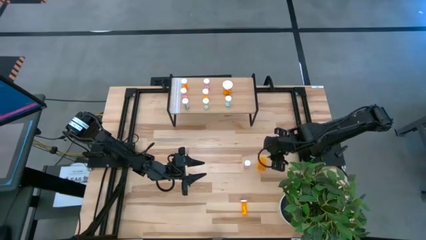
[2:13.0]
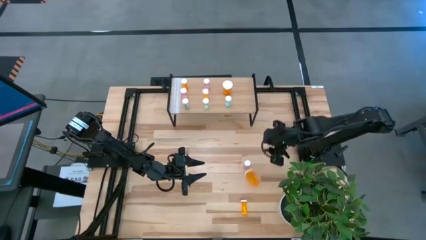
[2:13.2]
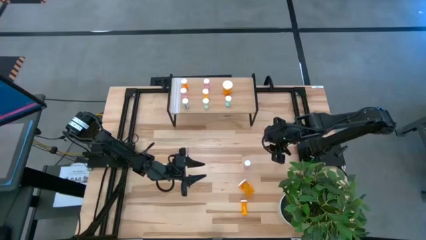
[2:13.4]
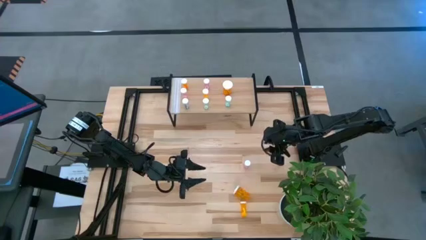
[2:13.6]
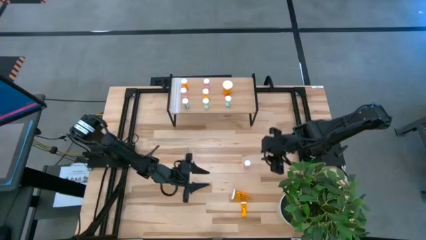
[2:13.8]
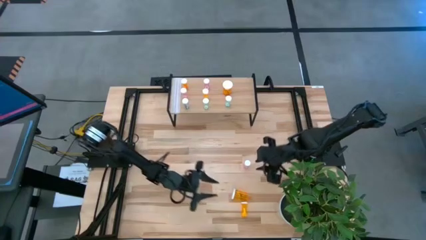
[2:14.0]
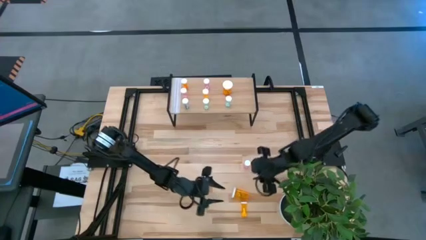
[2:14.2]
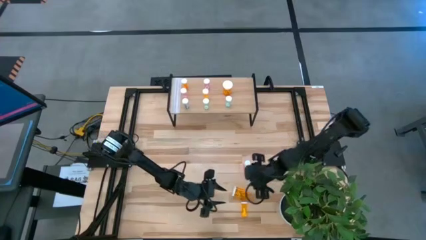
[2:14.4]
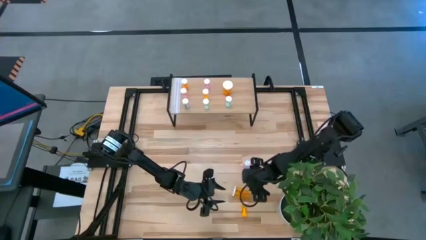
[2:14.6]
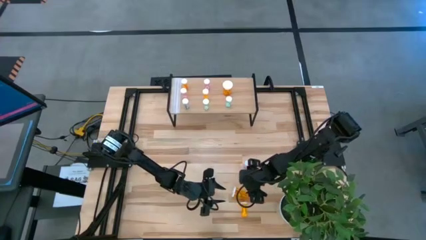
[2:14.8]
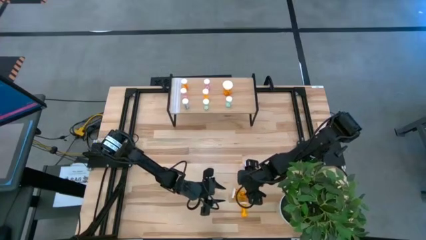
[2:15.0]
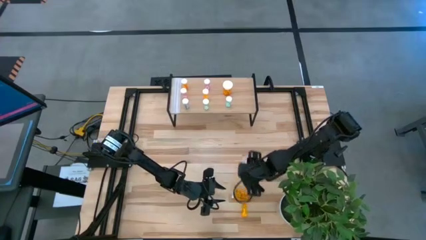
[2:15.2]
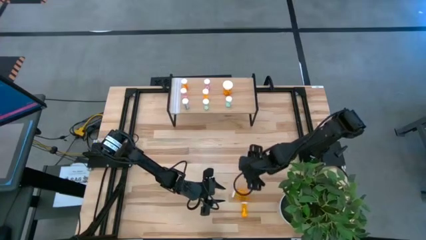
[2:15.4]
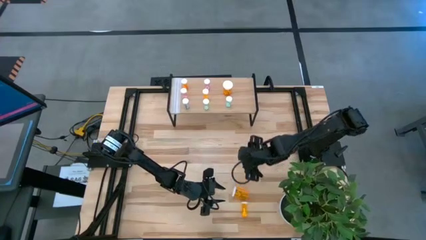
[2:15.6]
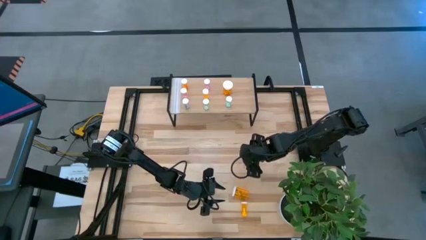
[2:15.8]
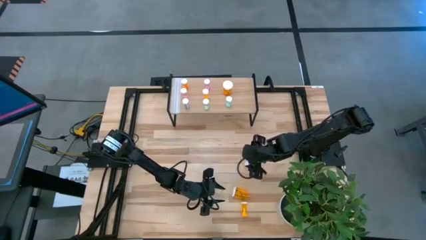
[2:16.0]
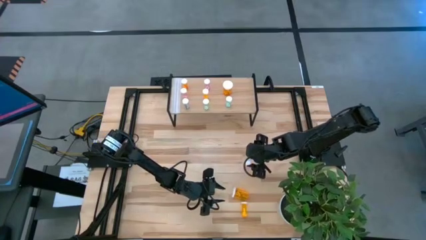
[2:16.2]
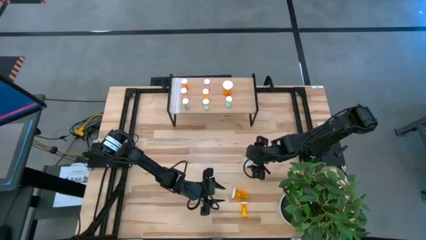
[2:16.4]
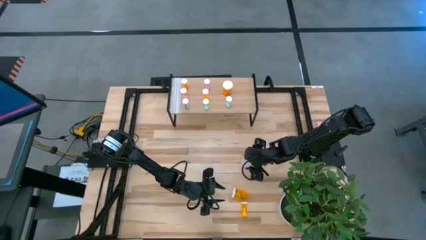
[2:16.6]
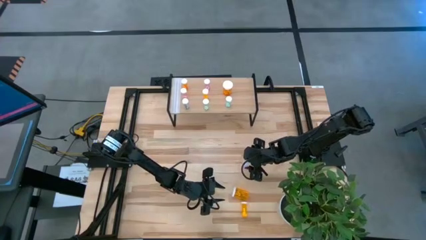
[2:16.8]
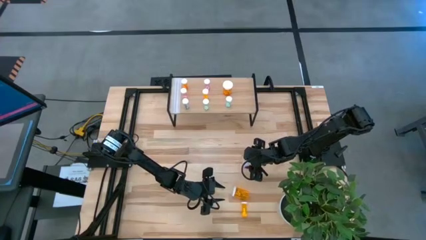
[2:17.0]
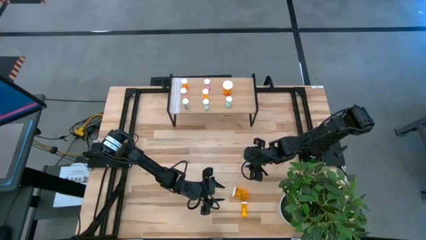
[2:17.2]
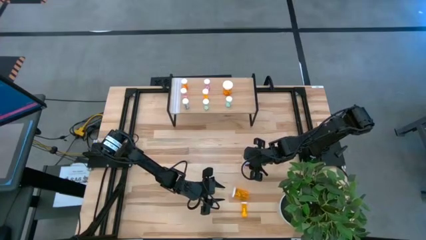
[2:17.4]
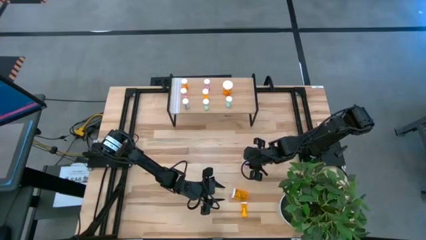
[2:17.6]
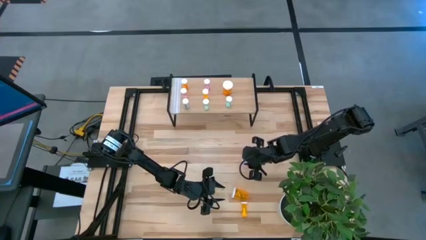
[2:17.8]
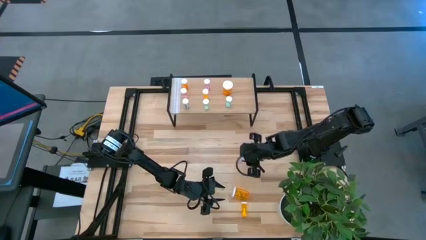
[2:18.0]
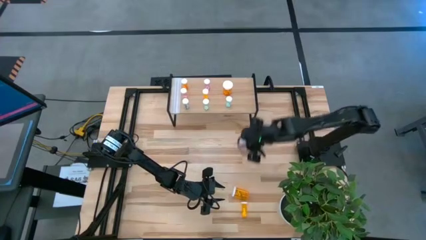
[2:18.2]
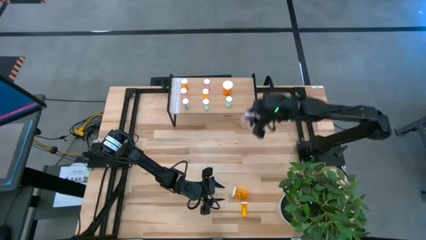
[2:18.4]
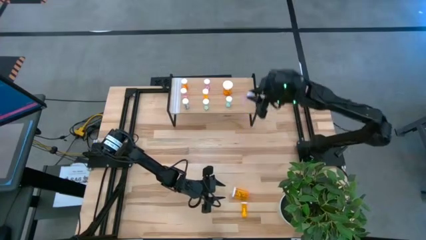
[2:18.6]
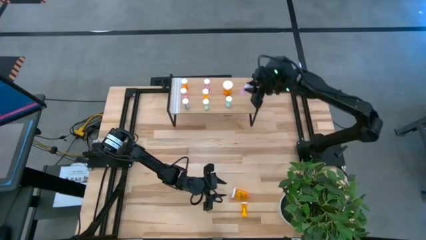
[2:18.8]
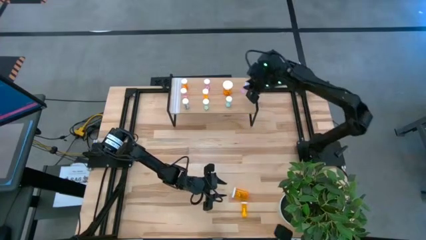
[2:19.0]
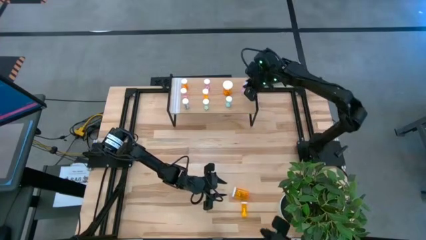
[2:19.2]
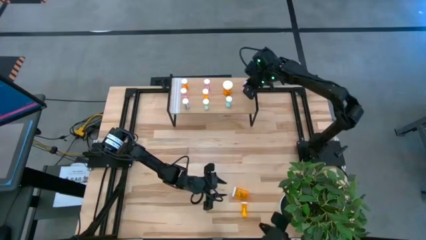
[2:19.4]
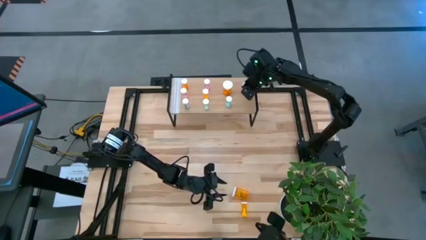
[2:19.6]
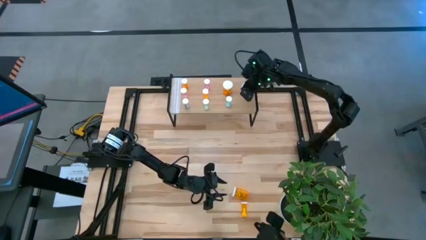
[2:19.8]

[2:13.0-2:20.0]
Task: Pick and place medicine bottles onto shelf by color
Put the pink pill bottle on the shelf

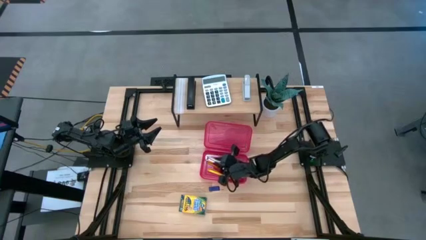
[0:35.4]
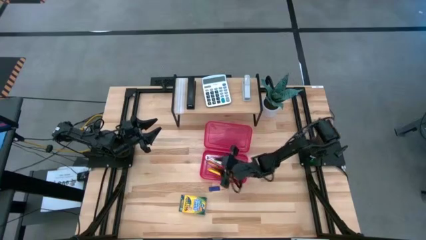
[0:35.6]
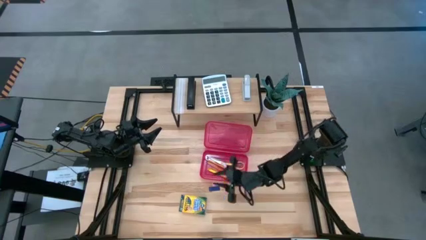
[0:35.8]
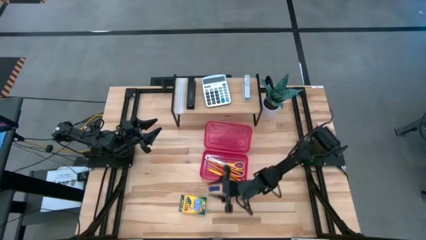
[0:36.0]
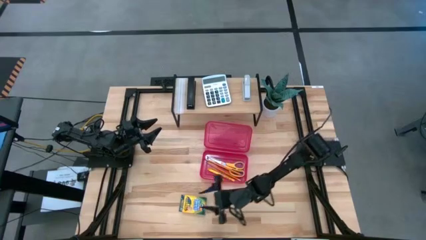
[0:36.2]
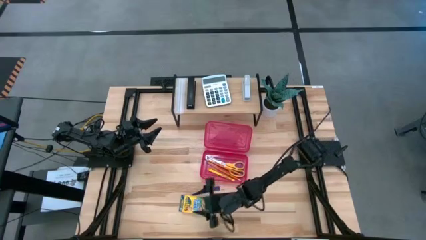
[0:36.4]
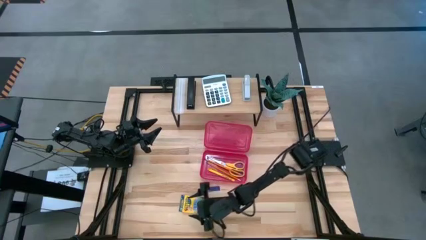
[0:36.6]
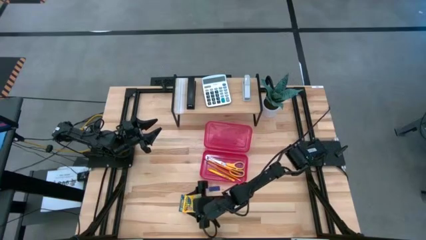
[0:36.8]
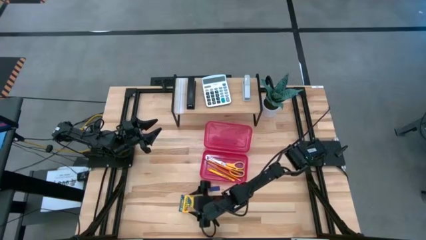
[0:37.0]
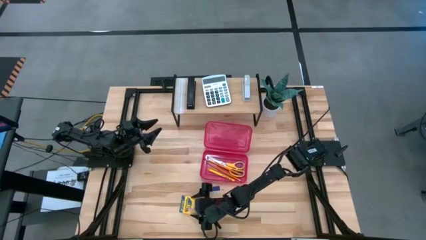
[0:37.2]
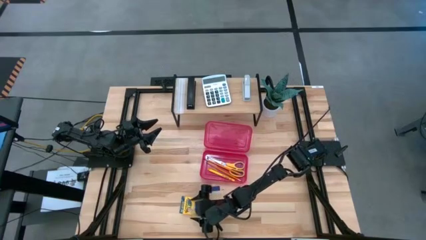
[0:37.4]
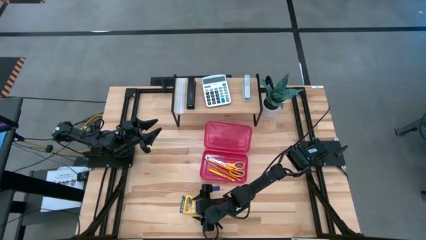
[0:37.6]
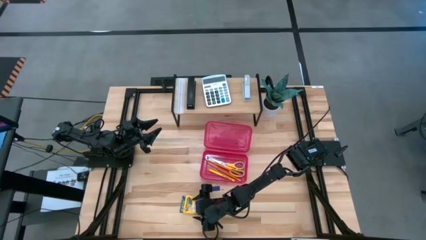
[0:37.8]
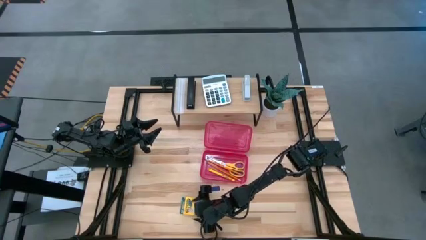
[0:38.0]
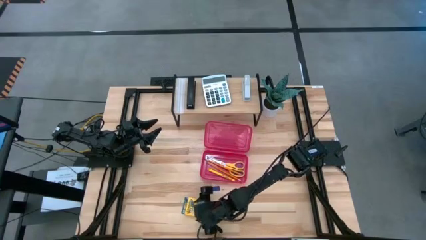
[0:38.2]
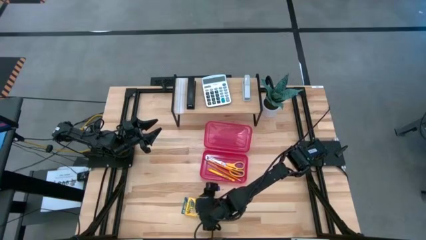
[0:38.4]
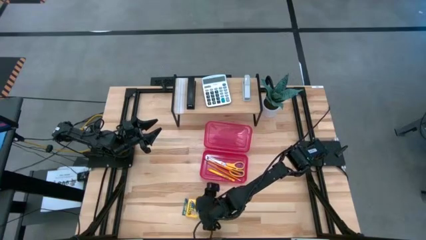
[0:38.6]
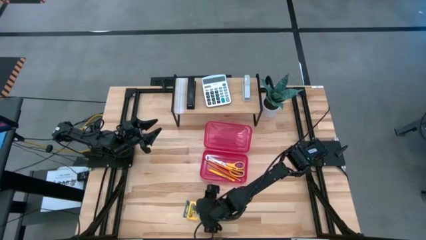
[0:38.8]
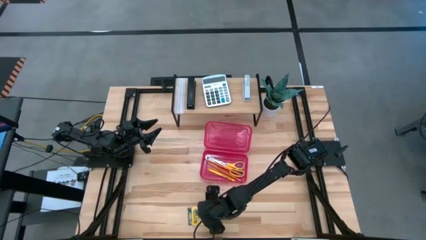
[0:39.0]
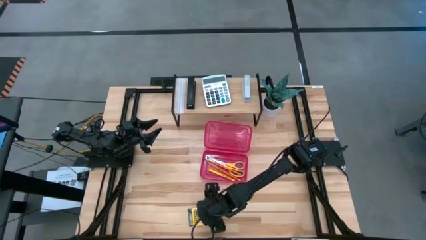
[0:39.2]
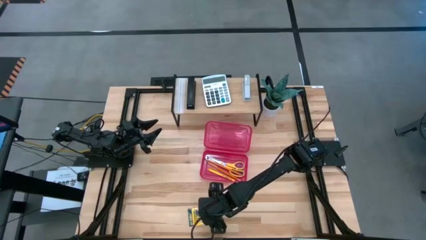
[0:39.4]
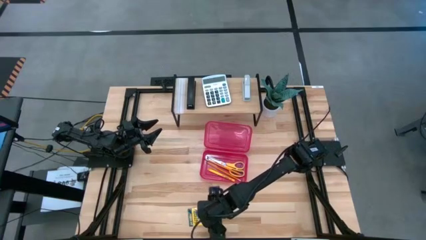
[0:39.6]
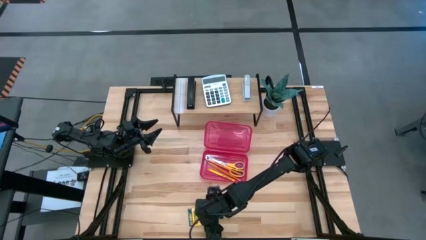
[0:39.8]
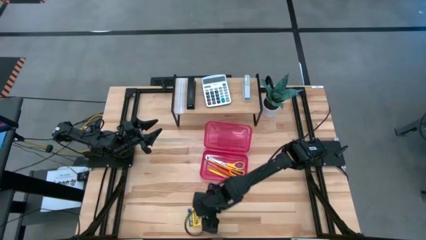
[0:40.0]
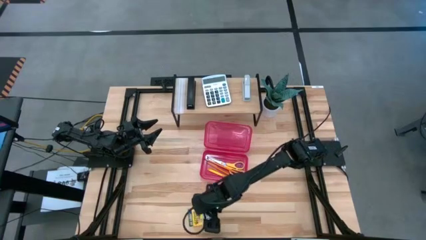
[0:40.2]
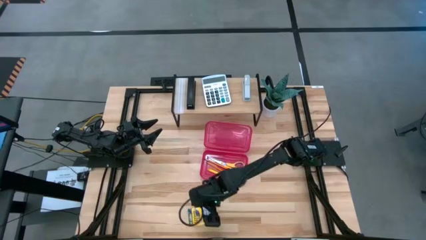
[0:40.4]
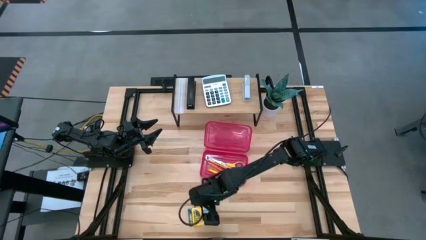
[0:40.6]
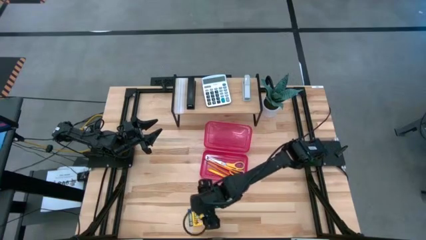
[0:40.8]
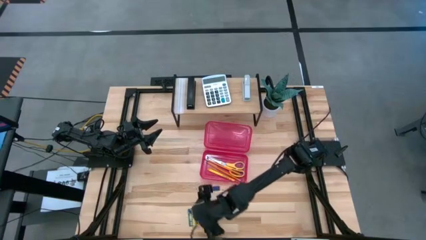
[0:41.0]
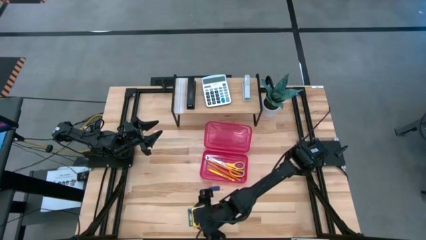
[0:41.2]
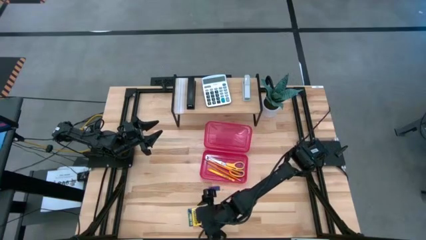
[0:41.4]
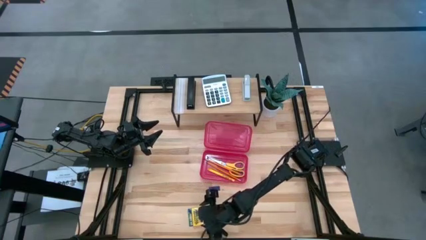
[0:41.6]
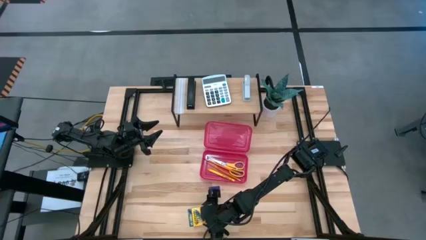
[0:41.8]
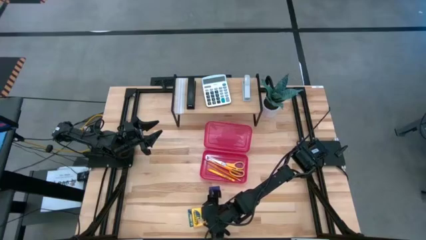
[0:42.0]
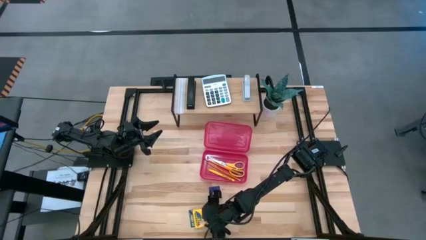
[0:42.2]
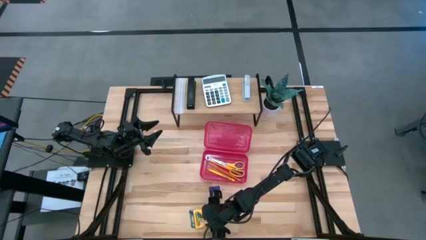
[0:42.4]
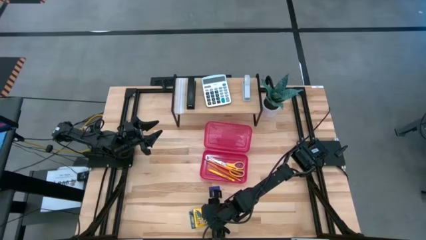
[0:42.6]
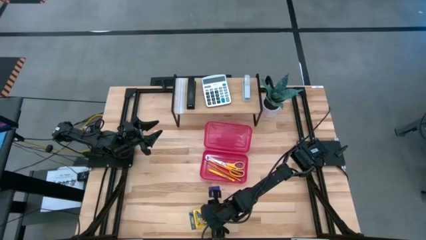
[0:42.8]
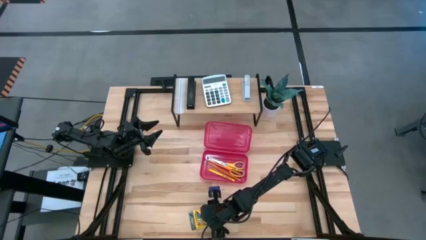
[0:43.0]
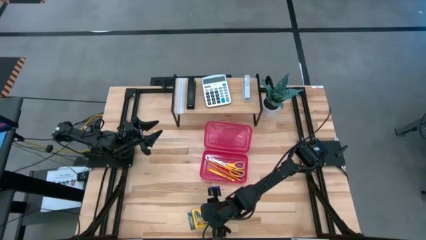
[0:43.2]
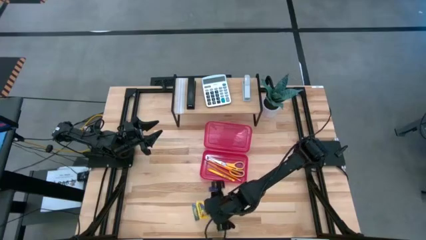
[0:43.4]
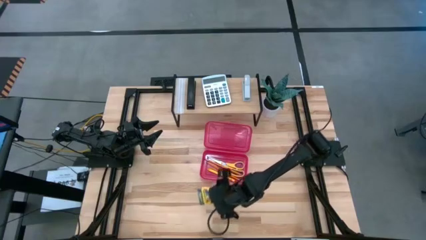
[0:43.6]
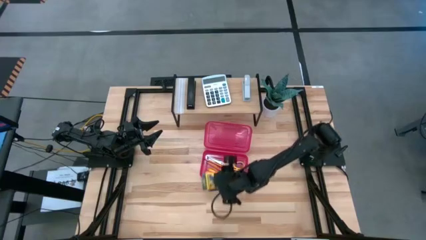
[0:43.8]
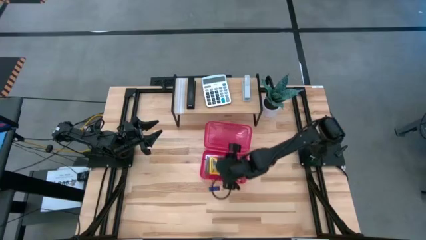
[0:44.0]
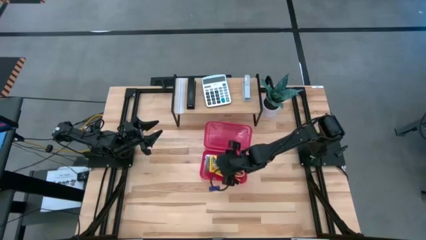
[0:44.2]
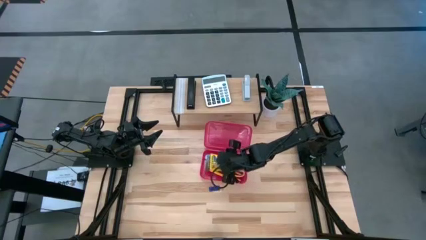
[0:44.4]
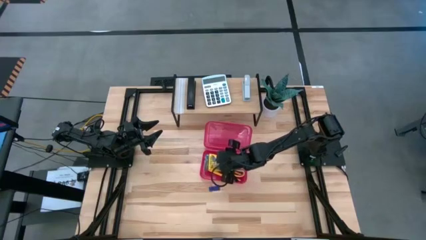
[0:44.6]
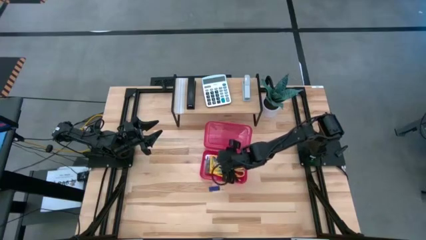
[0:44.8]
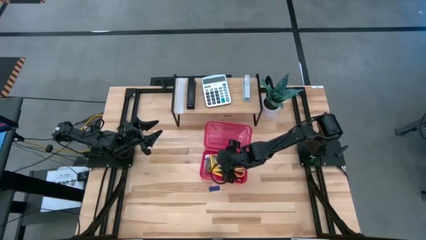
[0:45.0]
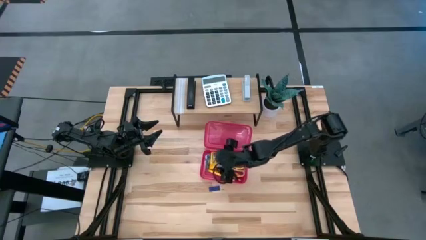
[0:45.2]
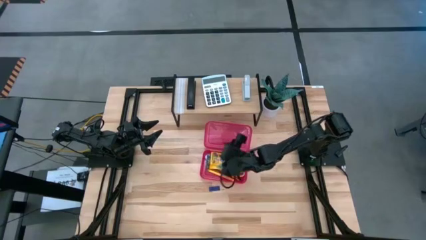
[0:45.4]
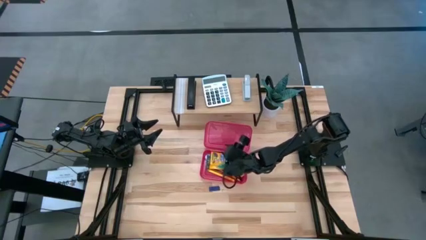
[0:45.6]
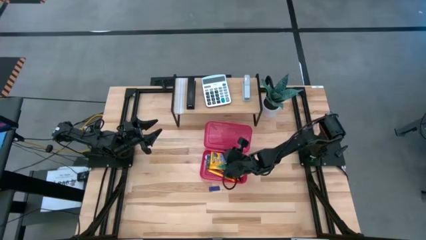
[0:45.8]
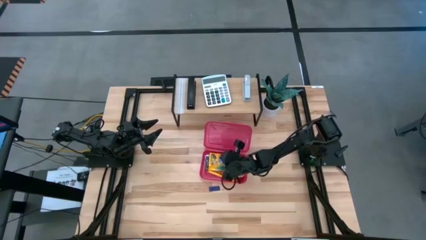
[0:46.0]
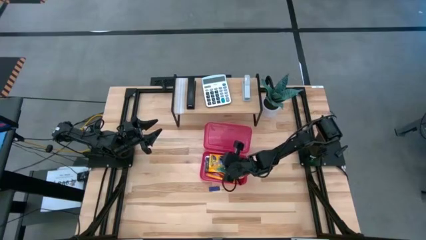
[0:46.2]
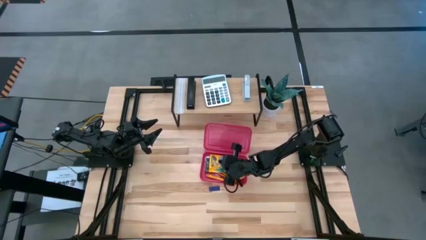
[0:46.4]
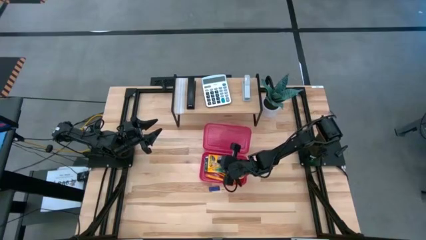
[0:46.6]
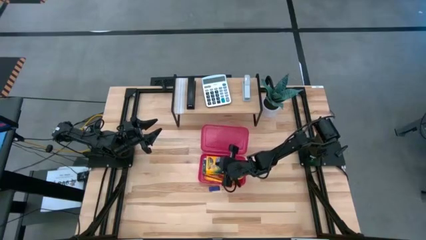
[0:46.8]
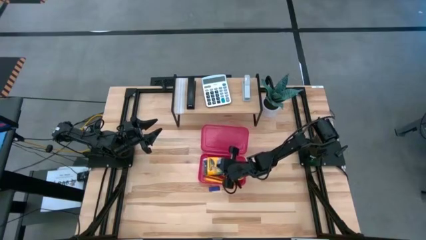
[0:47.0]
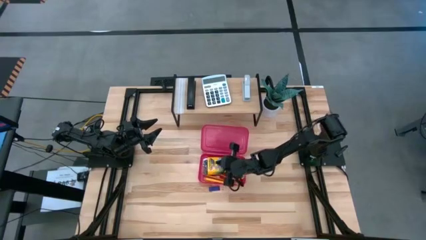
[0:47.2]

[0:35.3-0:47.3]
Task: Pack school essentials
Put the yellow crayon box into the red supply box
